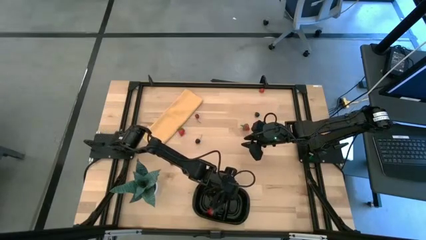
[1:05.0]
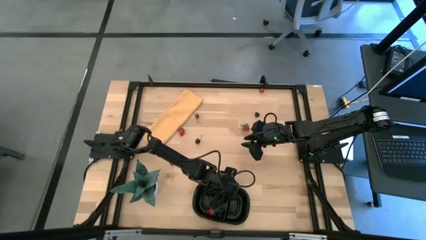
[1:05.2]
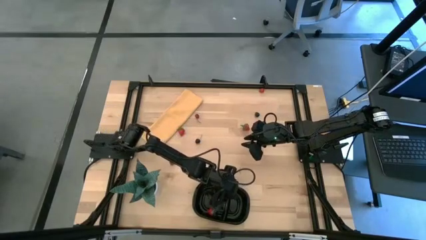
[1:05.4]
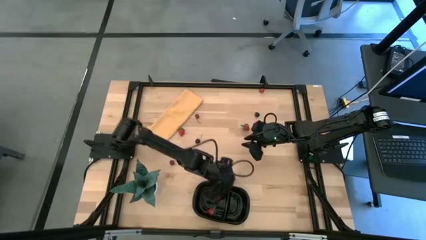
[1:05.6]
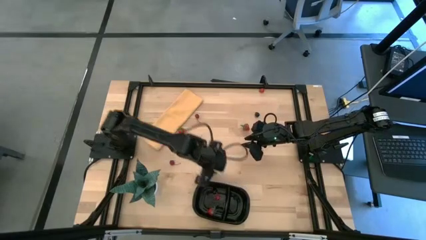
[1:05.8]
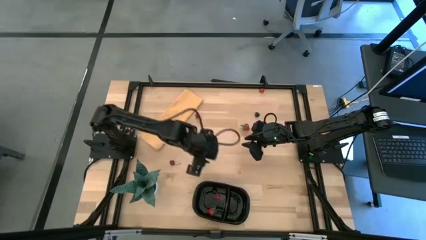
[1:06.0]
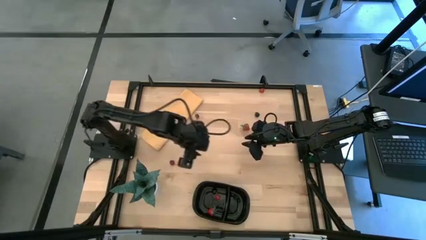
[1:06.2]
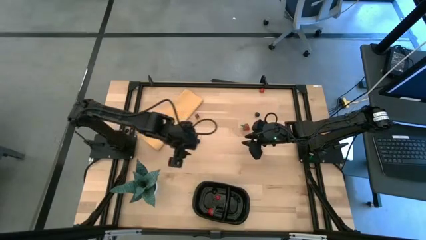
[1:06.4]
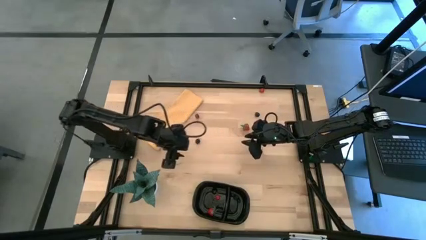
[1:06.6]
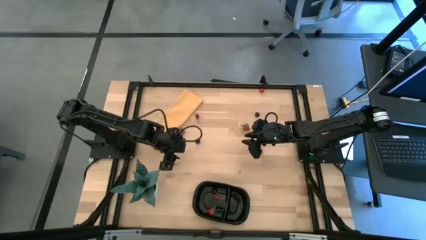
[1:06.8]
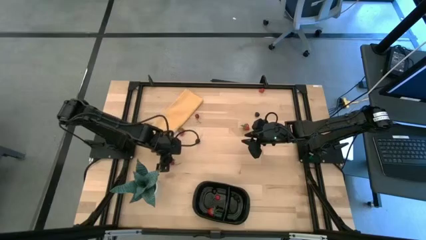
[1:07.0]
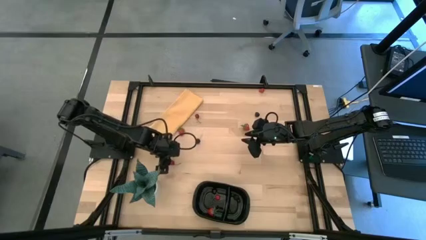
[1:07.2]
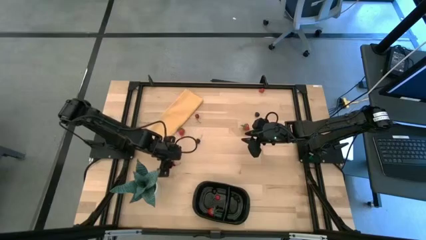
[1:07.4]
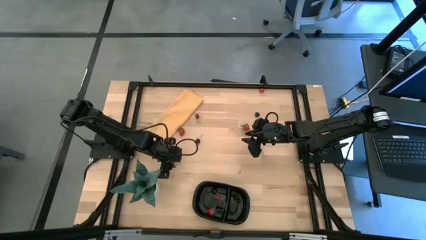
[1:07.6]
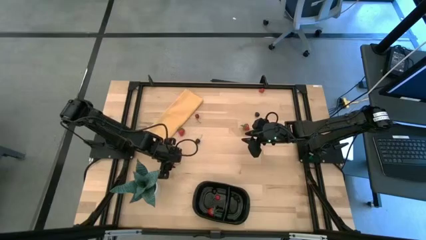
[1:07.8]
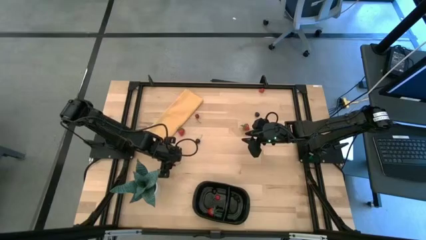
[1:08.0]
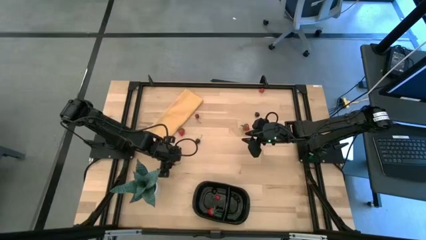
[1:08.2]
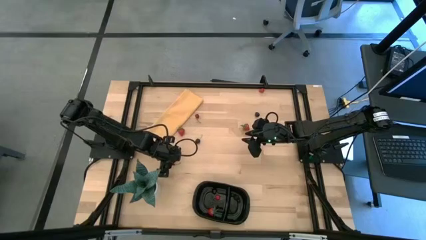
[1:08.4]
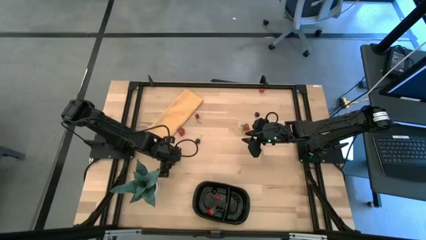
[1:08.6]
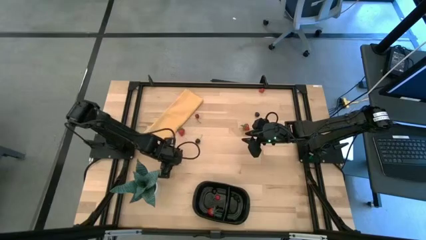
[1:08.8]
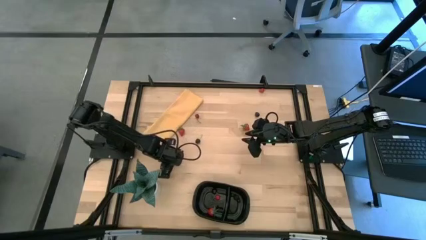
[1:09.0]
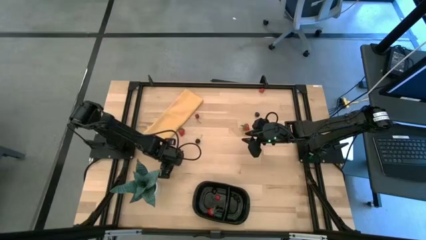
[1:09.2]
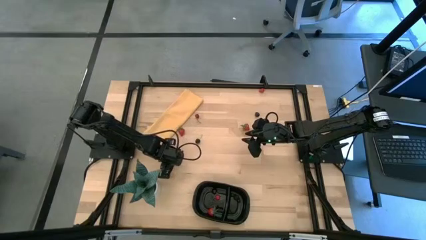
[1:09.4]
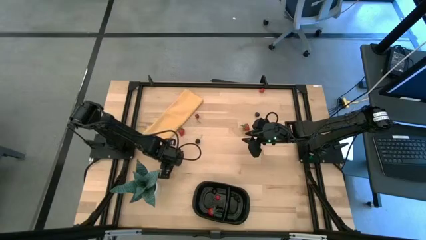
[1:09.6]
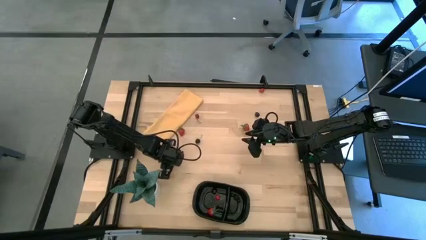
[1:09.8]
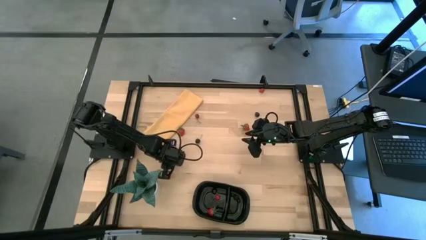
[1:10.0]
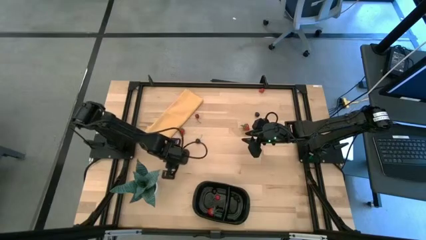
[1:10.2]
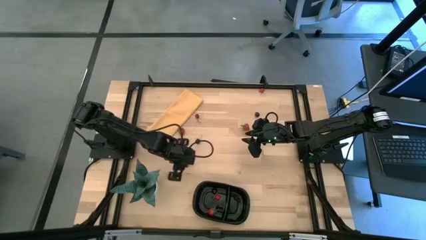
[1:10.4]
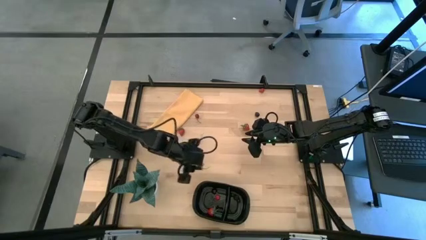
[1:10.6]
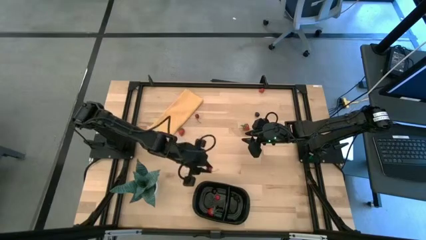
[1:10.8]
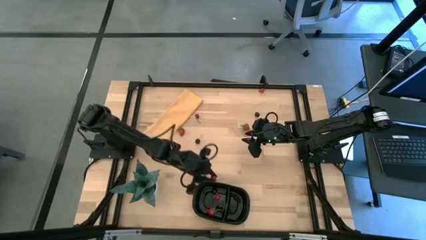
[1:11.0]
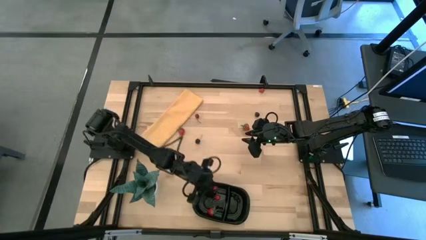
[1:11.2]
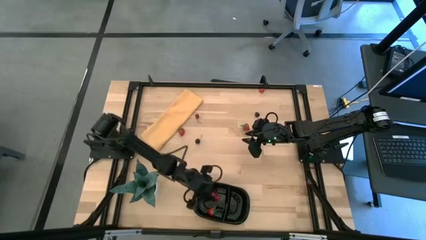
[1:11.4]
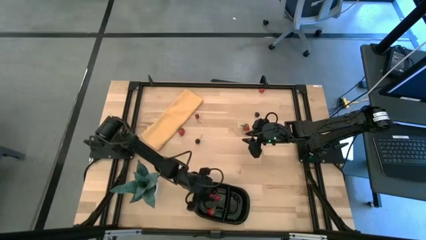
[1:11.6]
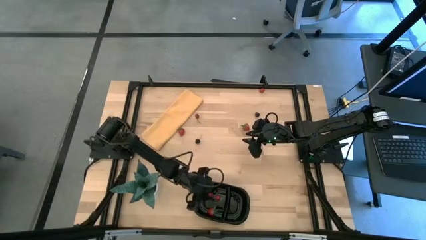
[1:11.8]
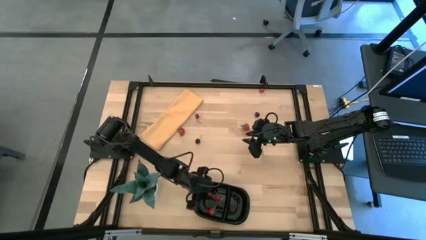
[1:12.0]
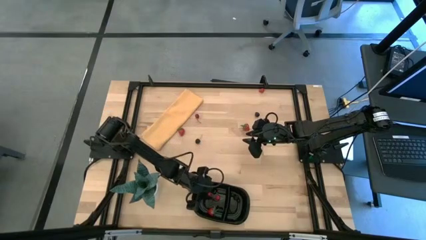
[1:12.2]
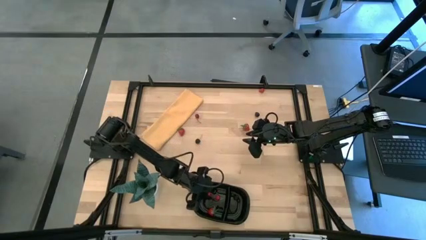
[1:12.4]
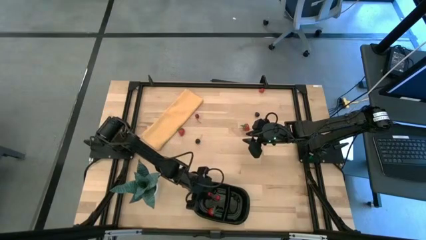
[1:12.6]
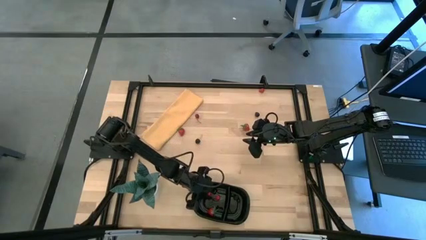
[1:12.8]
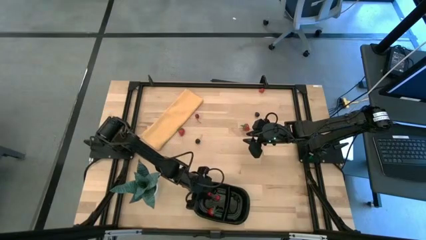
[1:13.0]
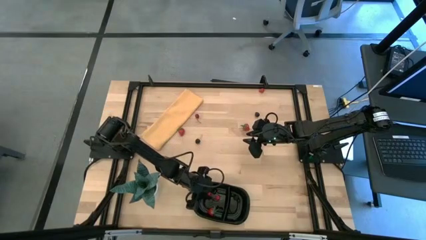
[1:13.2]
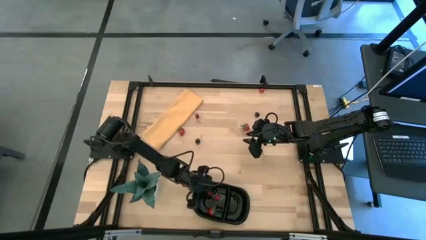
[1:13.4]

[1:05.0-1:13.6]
Task: Pick and placing Produce into tupperware
Put the bottom red cherry into the black container

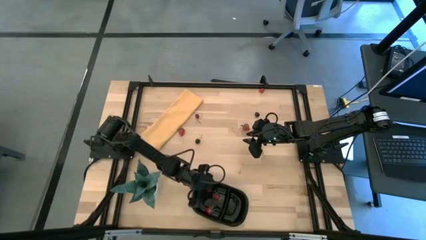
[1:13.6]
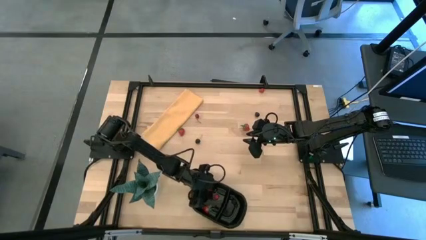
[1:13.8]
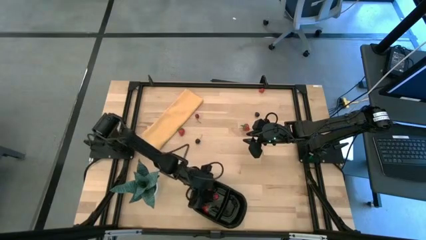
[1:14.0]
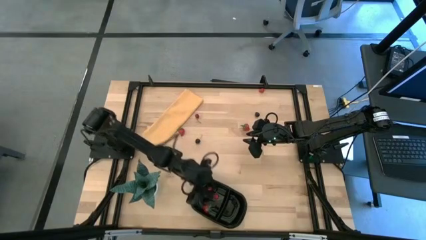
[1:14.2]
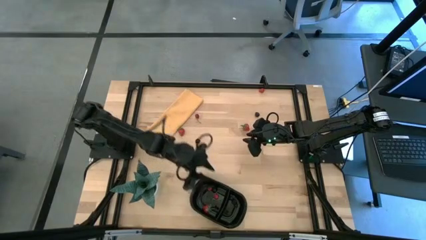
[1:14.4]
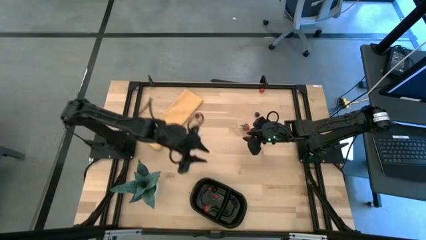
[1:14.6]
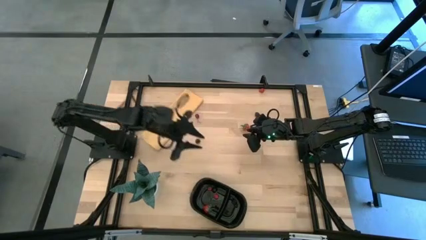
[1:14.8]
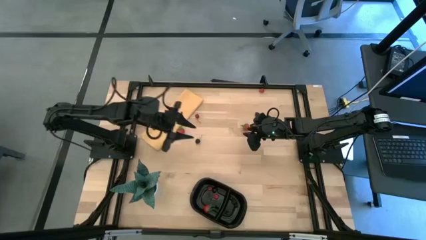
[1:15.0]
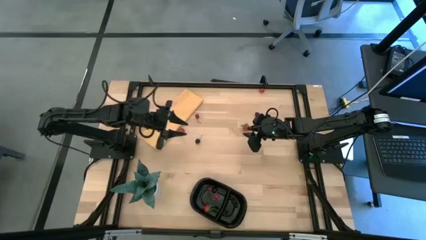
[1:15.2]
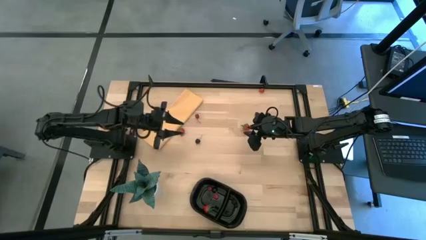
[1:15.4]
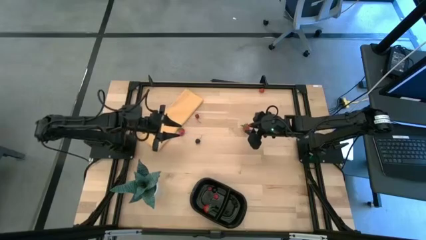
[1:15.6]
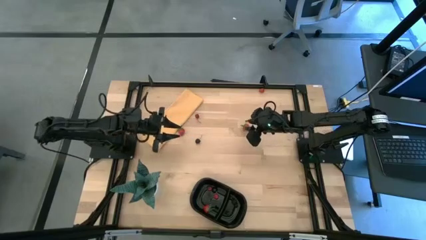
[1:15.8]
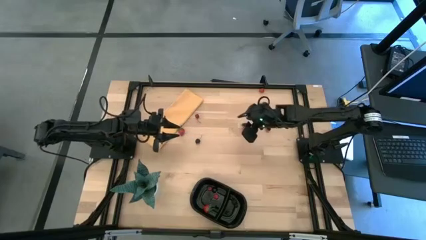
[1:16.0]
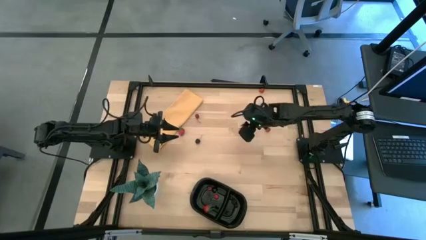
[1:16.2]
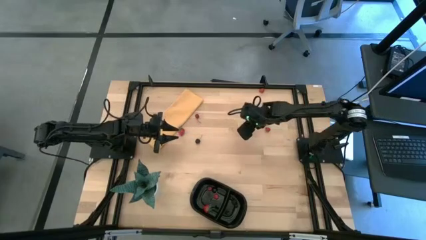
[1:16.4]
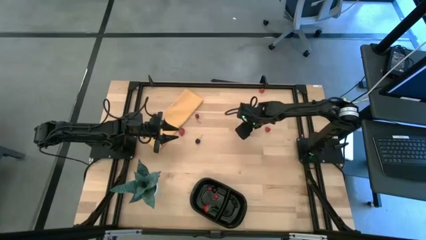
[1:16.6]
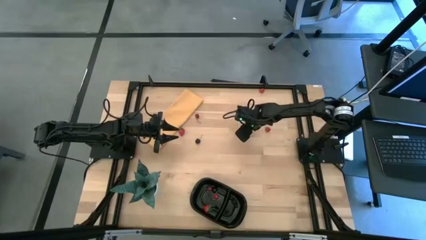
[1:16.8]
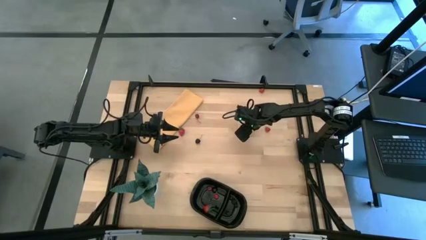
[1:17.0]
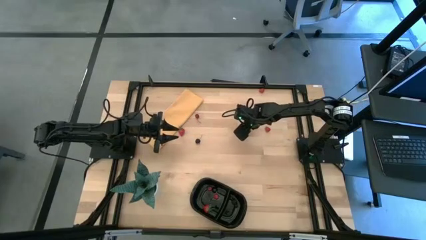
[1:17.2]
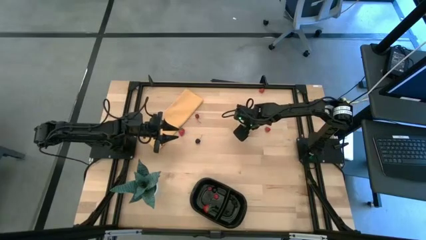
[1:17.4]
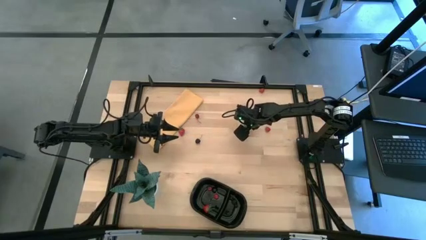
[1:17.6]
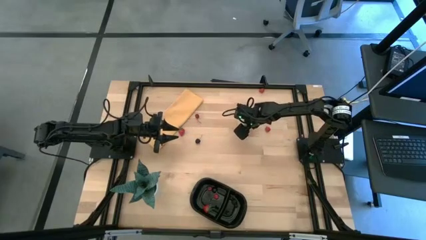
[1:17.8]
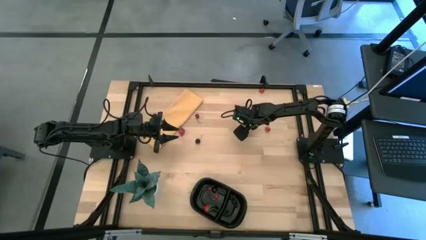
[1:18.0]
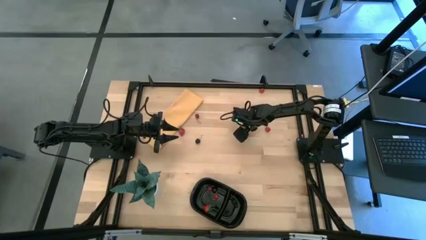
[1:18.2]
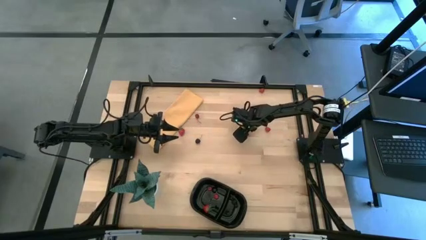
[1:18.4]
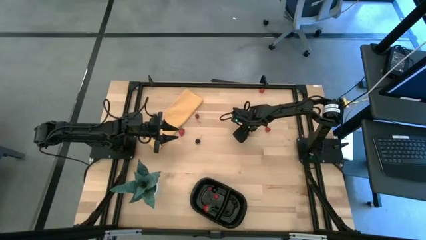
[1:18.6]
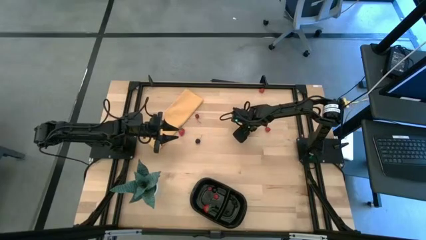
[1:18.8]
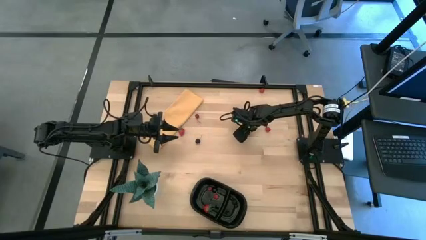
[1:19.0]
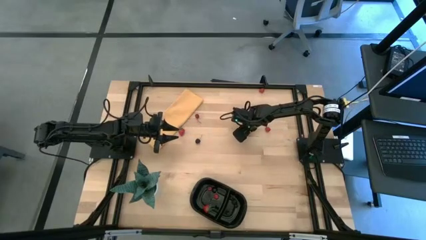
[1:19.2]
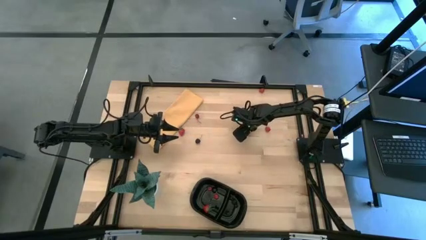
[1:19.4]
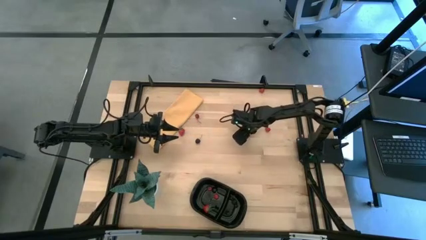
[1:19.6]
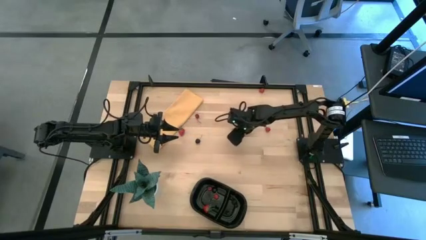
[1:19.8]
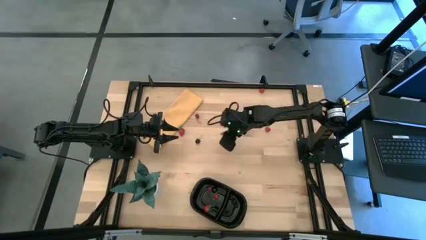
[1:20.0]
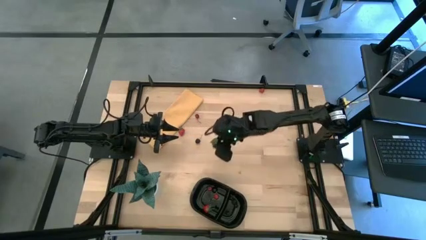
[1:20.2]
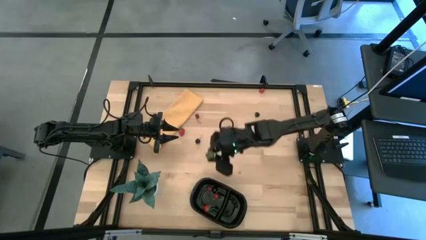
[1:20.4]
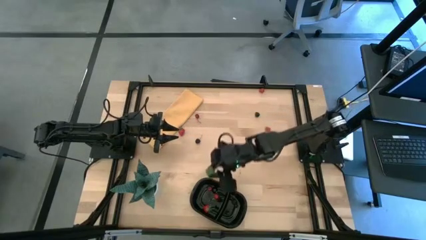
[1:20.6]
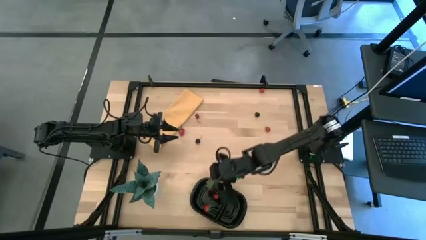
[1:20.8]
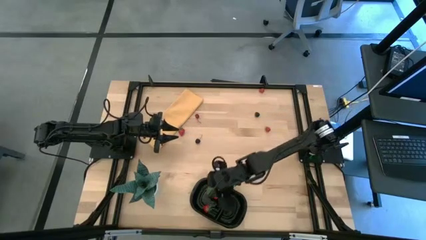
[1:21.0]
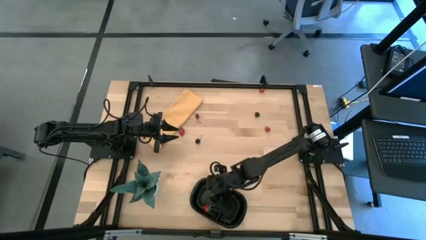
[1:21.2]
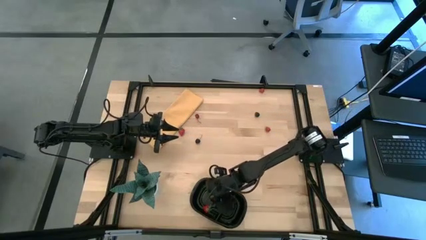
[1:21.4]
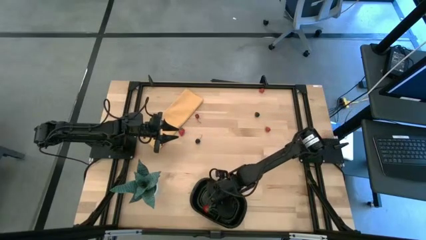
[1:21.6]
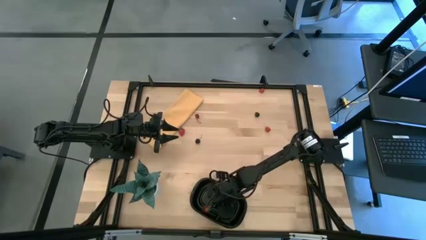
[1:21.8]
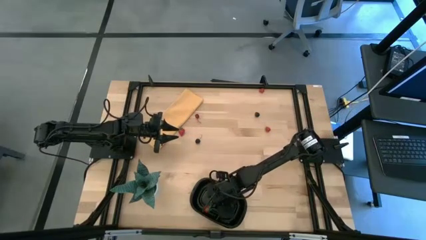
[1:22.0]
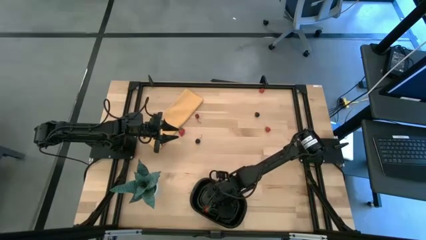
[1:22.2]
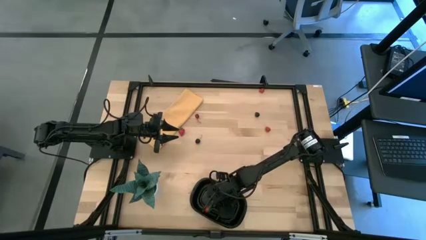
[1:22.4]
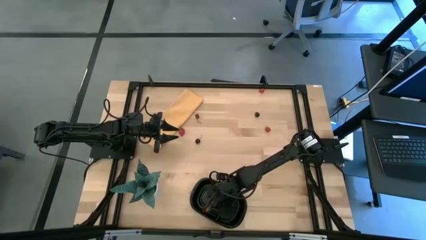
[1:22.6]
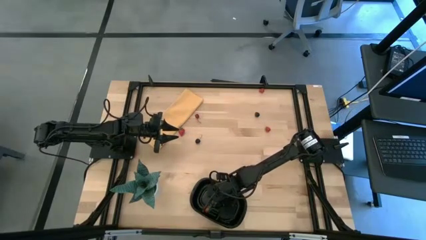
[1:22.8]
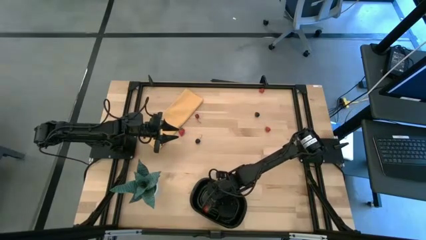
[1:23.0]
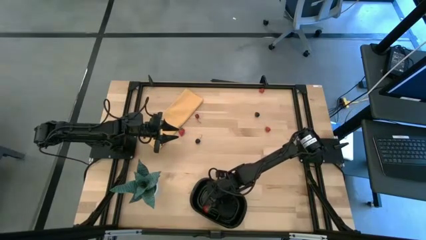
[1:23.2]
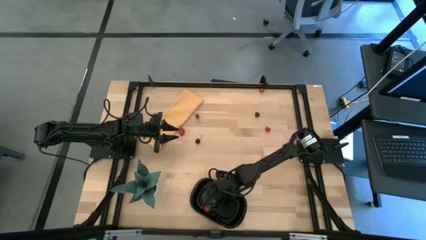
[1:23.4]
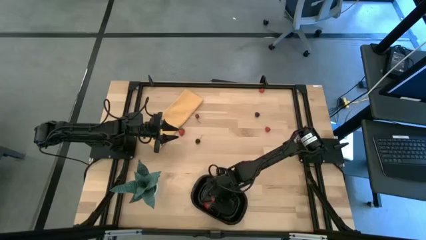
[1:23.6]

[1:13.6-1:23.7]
Put the right red strawberry into the black container
